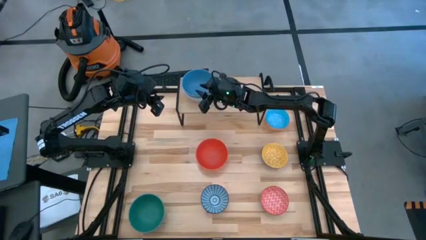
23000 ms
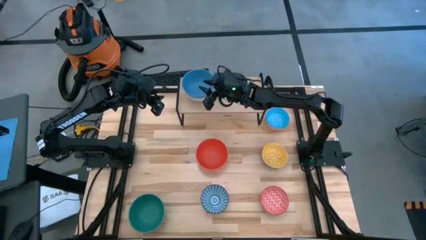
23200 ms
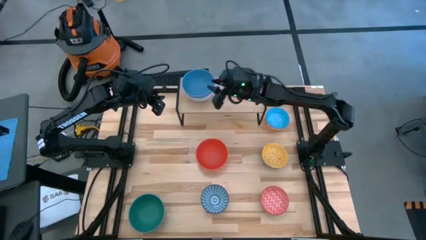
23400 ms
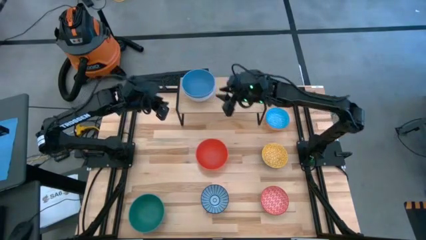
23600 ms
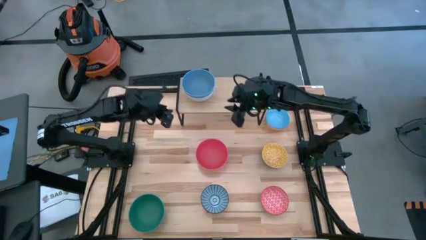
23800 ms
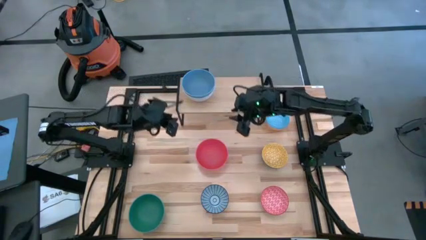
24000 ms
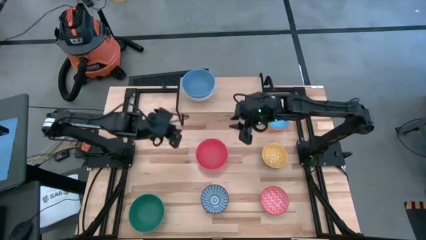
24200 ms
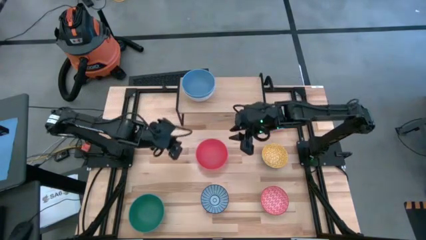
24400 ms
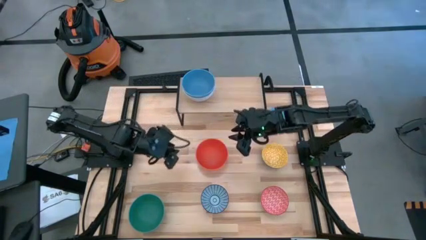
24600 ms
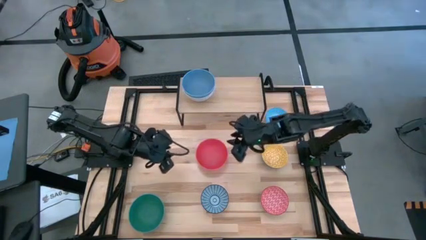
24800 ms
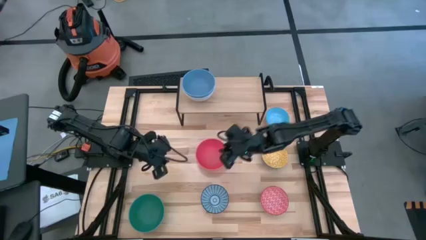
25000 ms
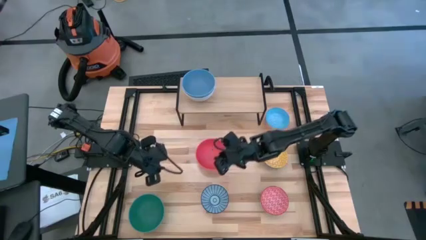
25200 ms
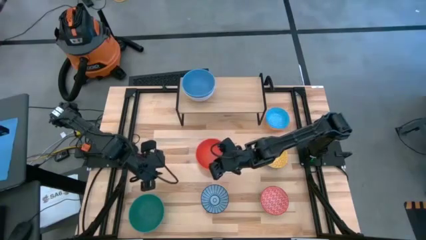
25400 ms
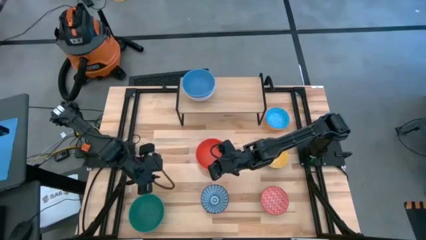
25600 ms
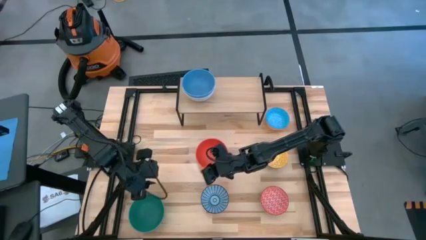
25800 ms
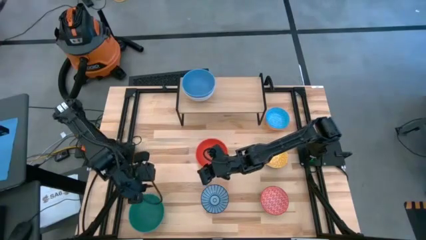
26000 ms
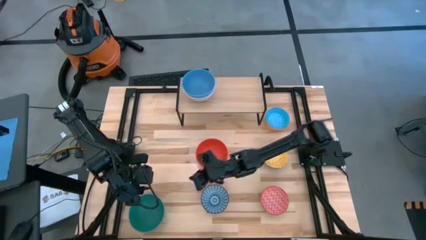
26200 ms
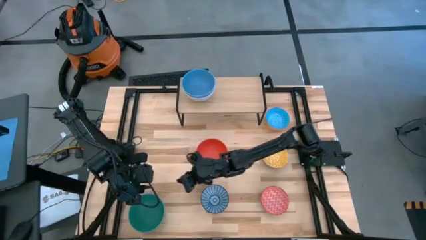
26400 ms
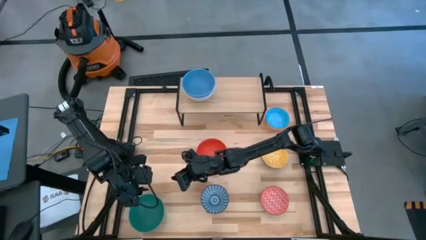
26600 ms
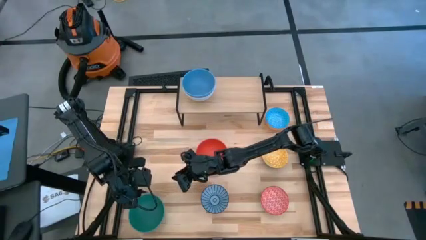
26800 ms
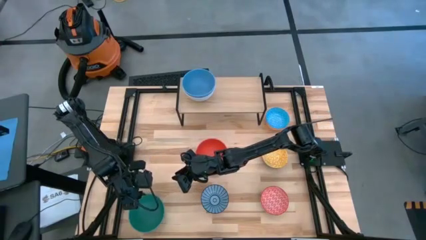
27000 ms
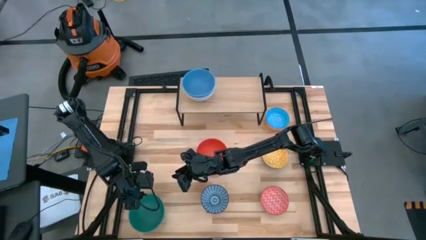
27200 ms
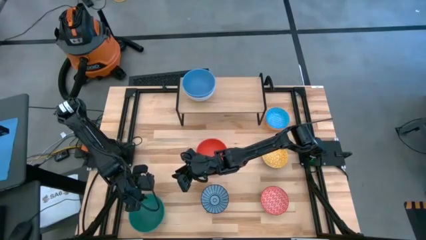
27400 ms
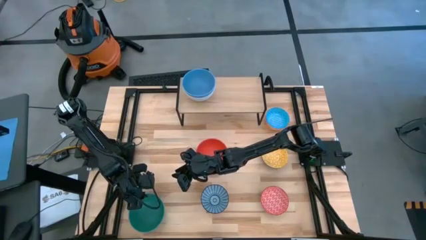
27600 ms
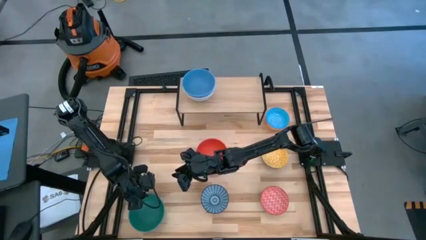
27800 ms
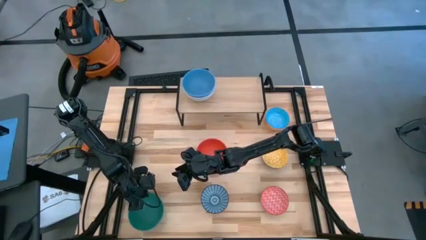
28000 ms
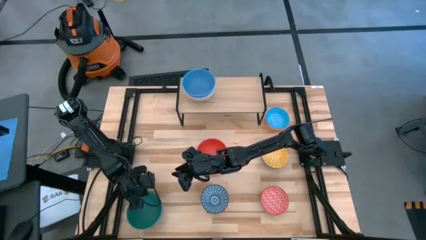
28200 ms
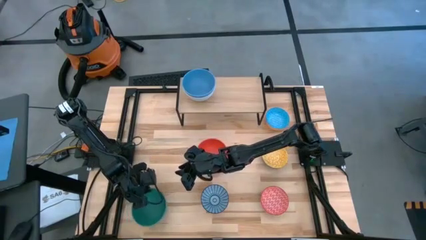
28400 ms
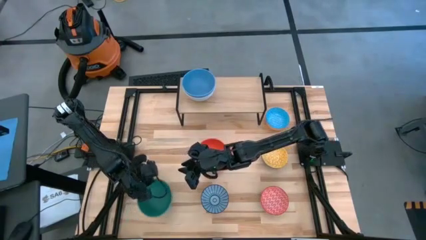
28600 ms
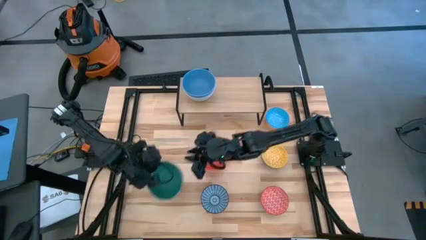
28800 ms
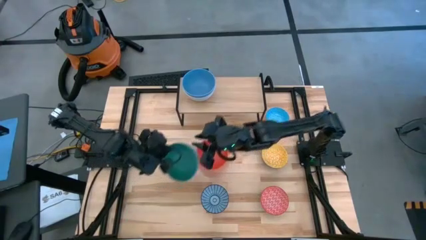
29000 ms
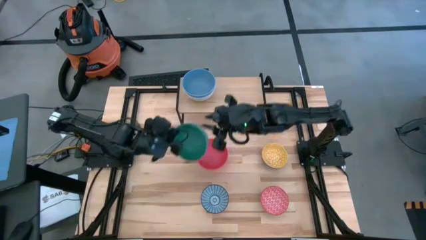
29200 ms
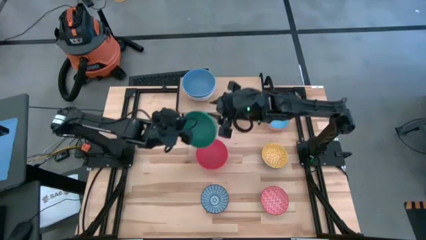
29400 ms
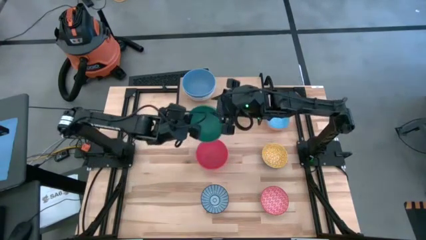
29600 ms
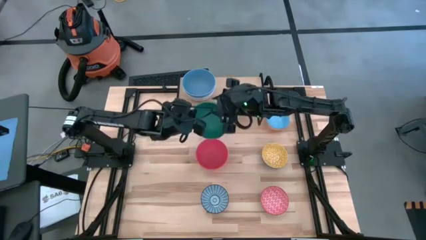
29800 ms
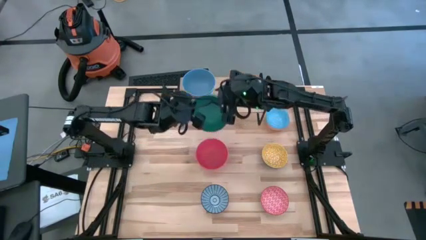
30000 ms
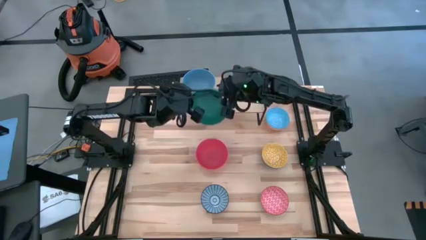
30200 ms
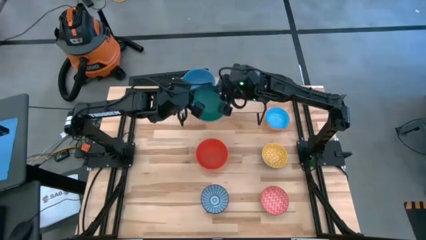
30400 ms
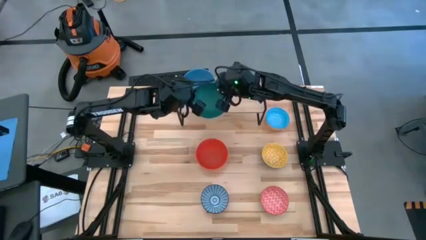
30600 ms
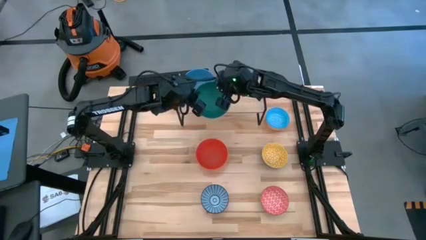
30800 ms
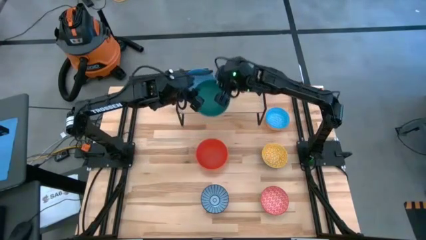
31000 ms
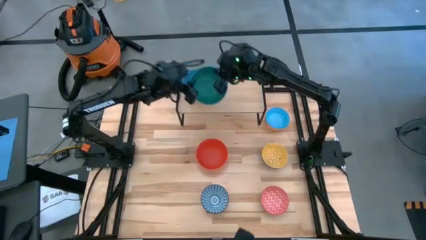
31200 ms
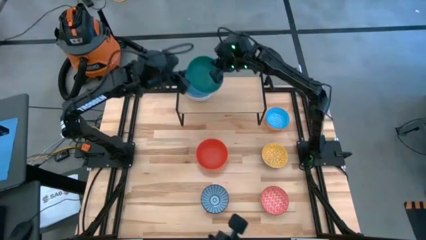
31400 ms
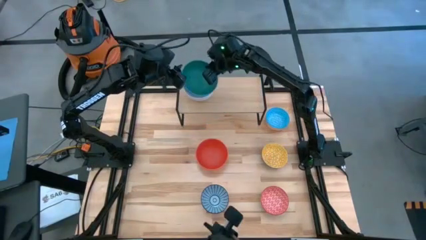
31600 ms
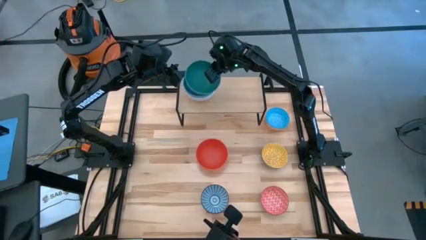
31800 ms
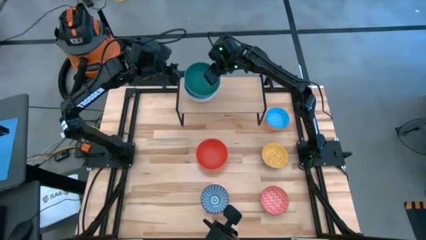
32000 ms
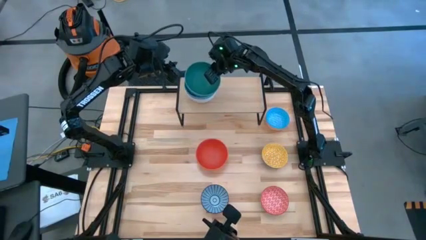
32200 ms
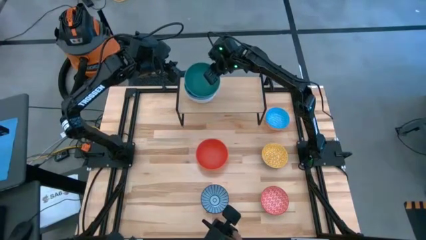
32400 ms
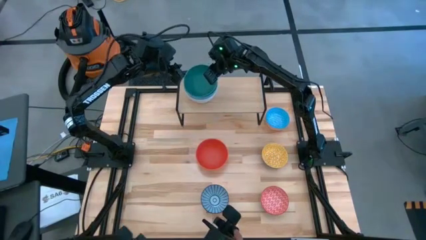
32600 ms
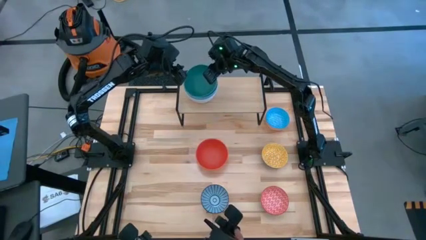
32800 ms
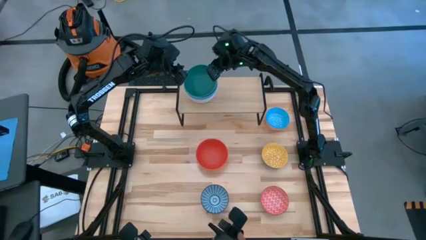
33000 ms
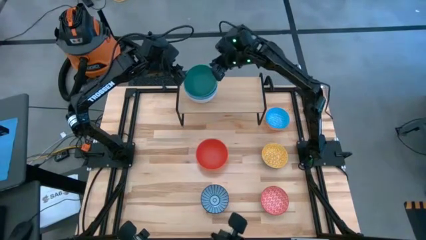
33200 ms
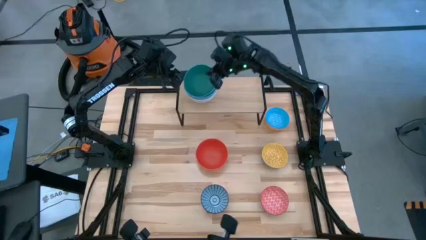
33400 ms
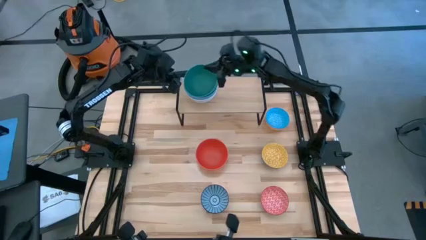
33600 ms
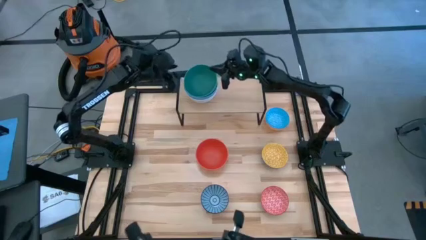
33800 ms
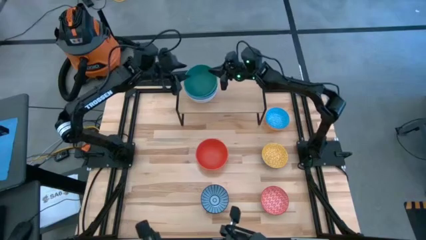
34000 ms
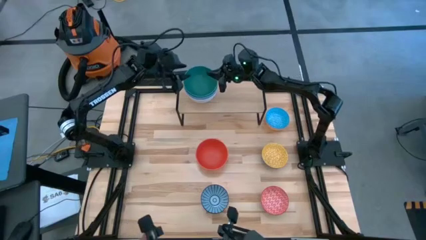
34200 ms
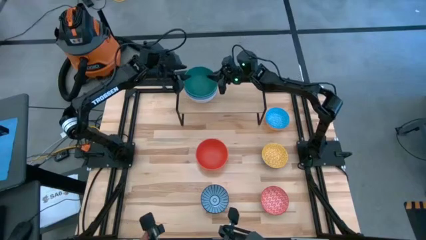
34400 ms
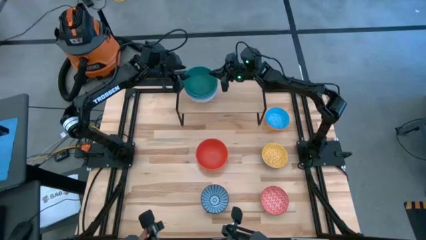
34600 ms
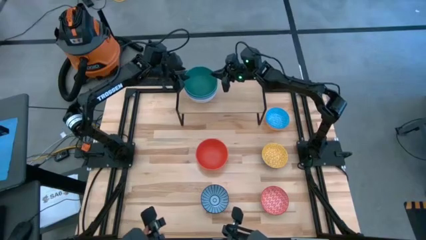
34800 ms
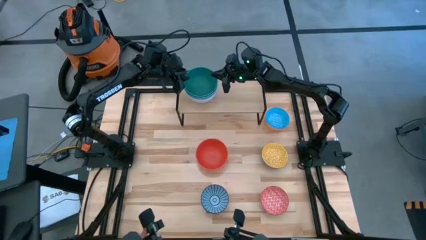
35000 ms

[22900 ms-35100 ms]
Task: Place and stack bowls onto a shelf
Stack the green bowl on top of the blue bowl on the shelf

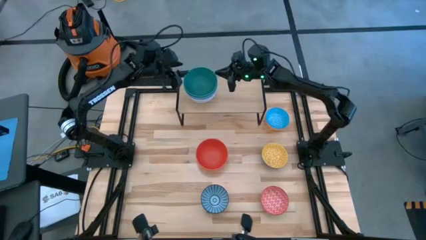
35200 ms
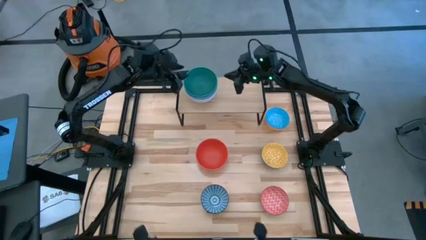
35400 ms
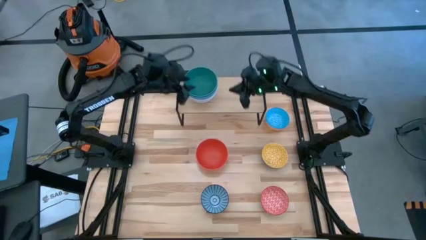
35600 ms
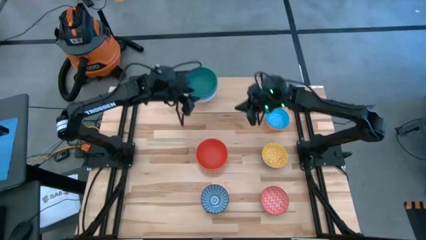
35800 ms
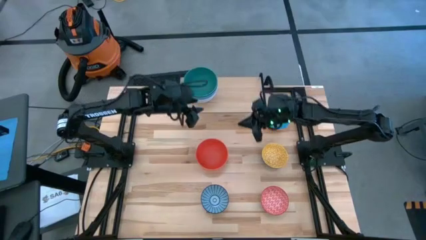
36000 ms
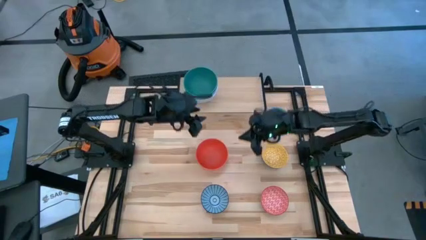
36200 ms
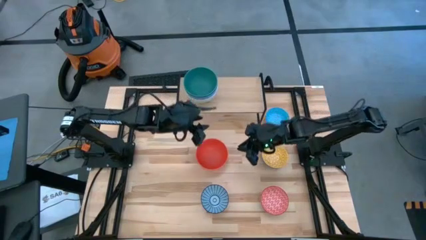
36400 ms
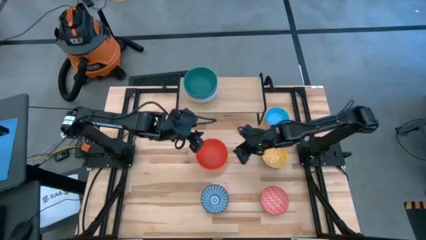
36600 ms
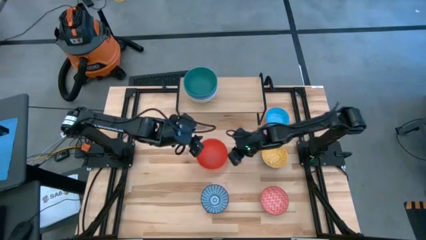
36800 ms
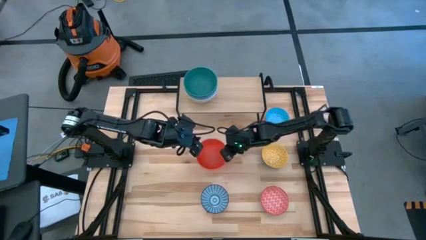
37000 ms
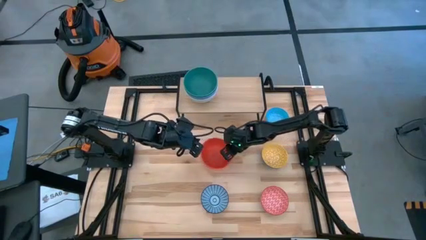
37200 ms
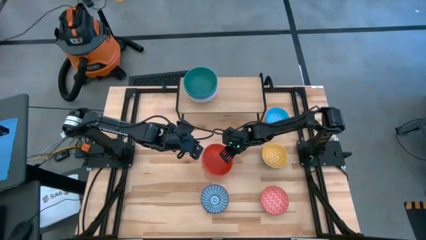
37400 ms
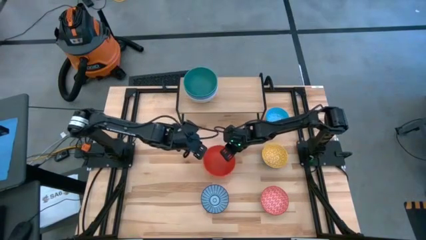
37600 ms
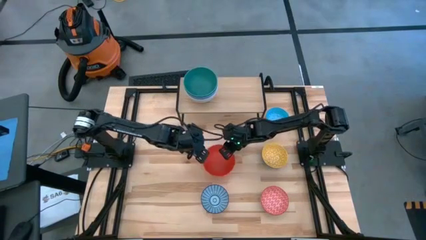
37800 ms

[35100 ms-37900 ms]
Stack the orange bowl on top of the green bowl on the shelf

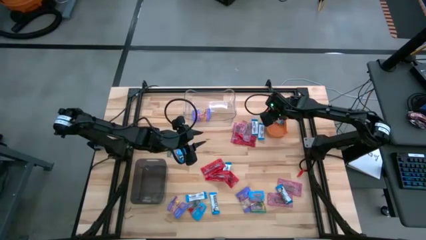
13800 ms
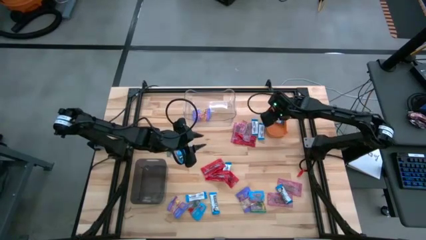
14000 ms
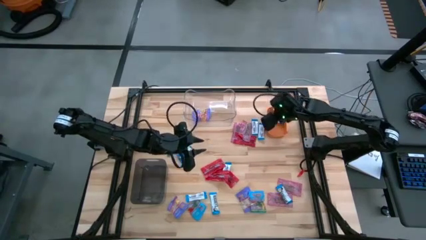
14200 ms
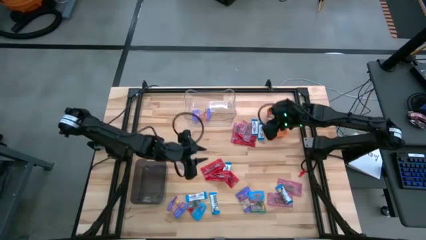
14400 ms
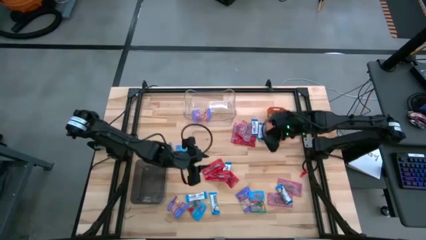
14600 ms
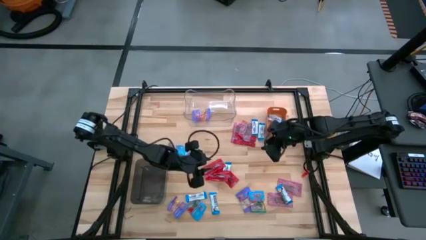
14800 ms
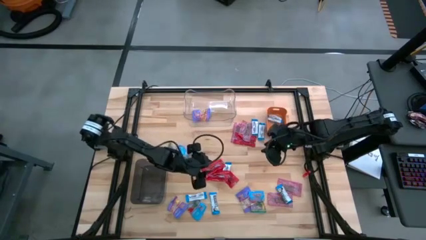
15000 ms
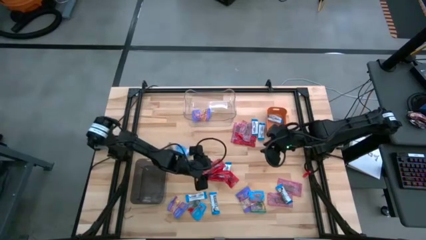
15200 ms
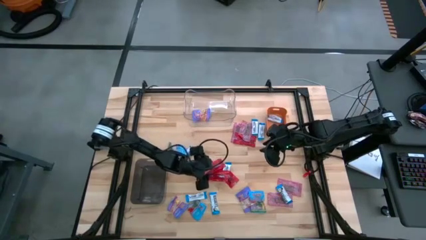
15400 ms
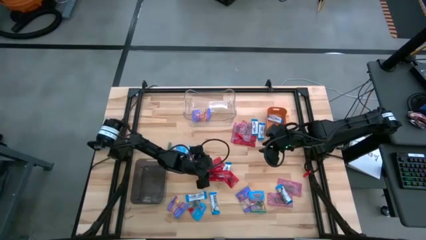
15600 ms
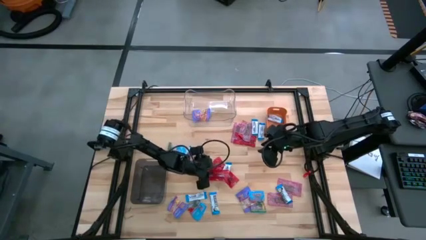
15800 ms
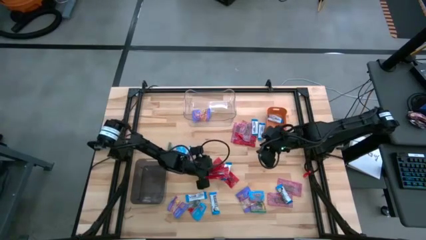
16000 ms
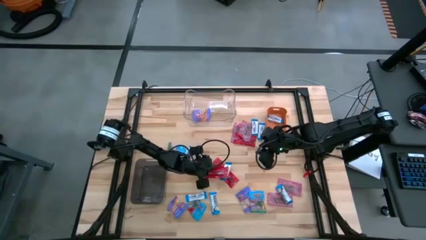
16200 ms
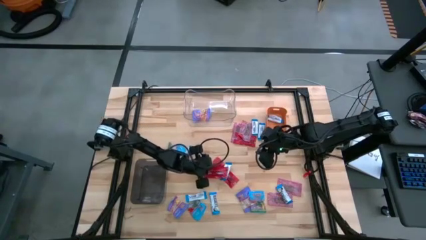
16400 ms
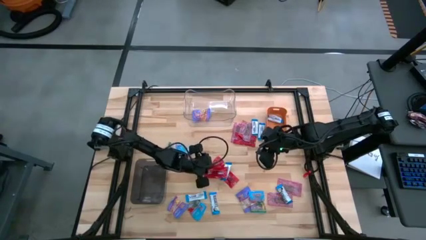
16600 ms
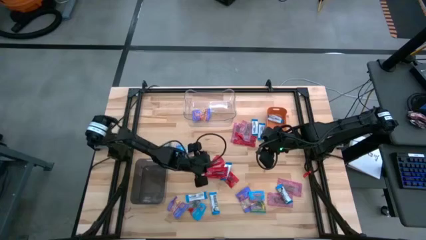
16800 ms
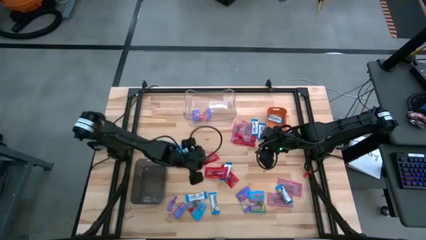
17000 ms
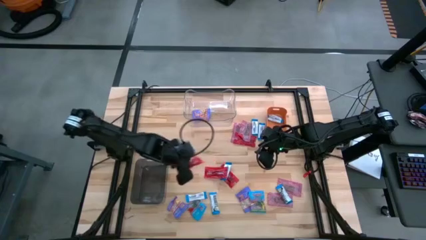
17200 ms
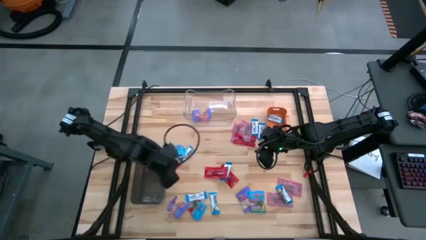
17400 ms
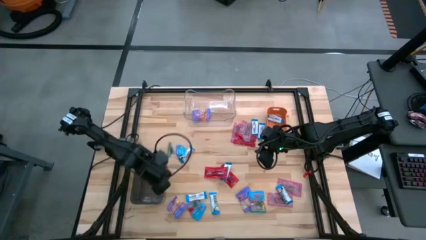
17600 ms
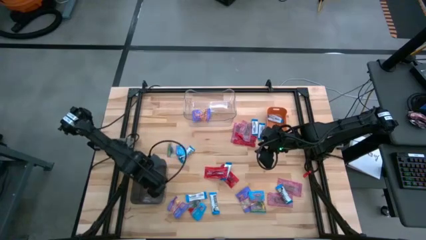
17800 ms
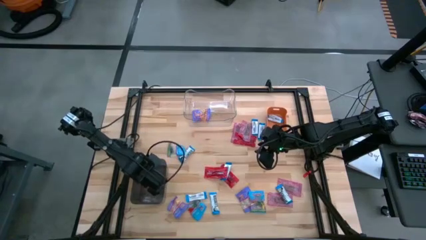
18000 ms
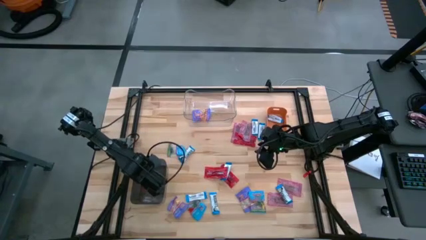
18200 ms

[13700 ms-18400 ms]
Task: Sort candy
Put the red candy into the black bin
